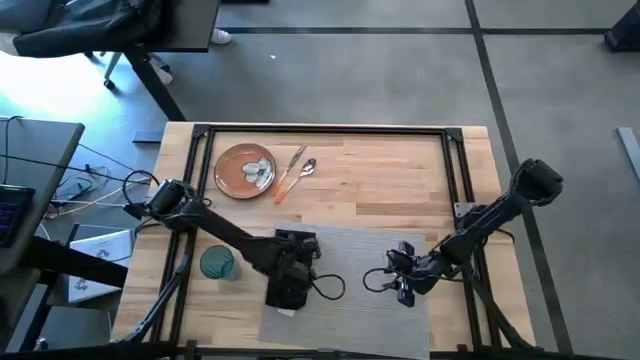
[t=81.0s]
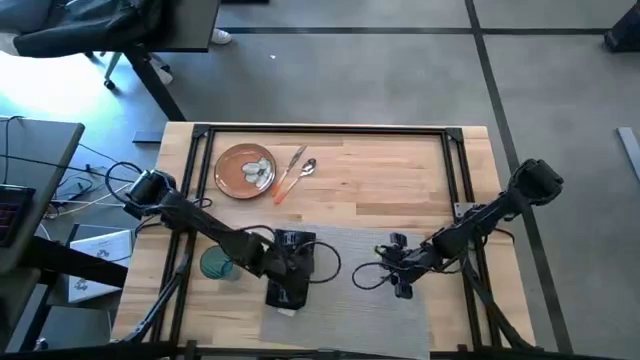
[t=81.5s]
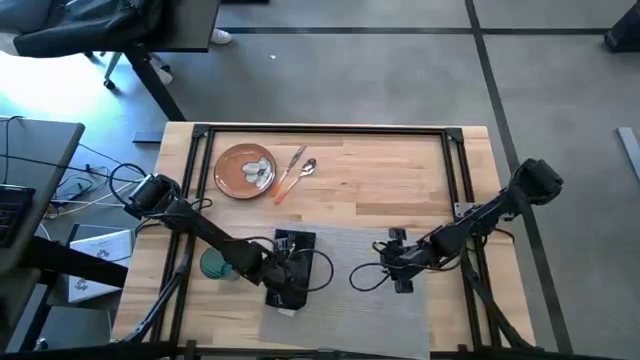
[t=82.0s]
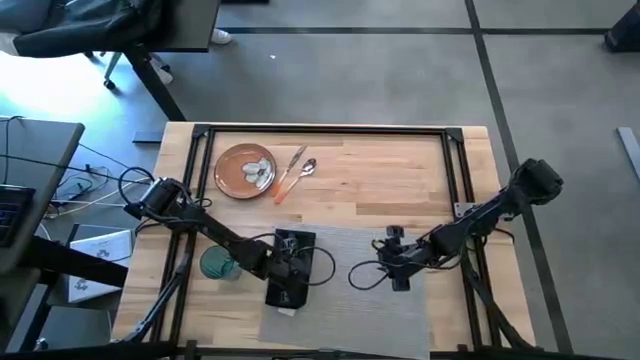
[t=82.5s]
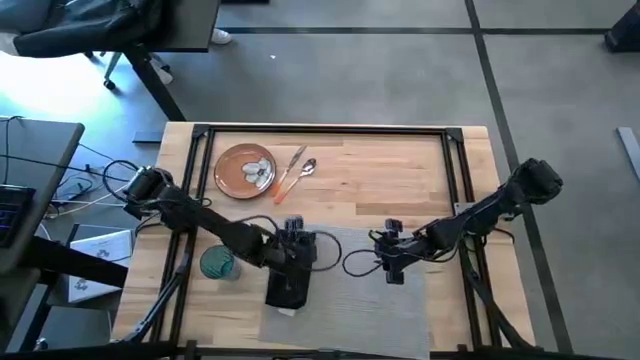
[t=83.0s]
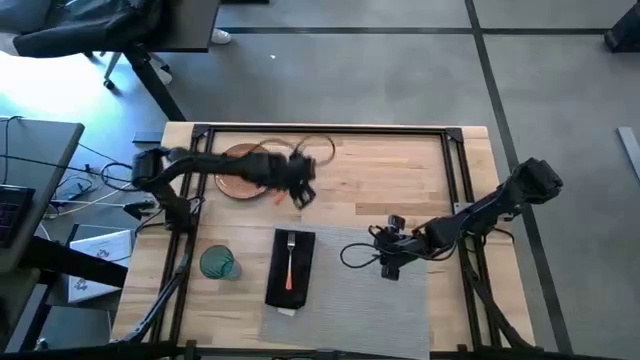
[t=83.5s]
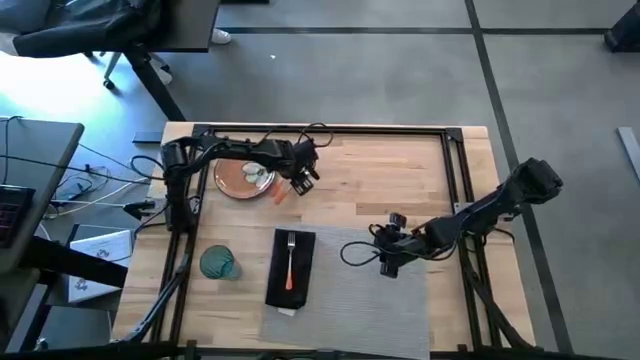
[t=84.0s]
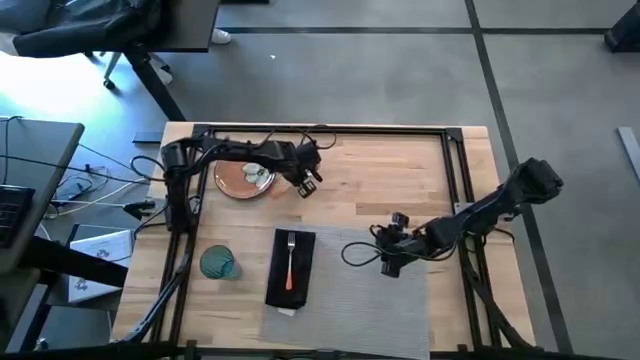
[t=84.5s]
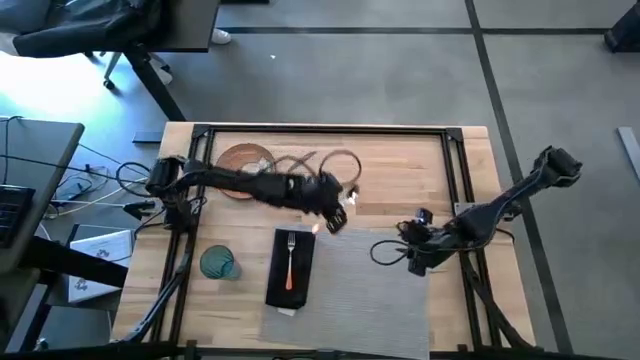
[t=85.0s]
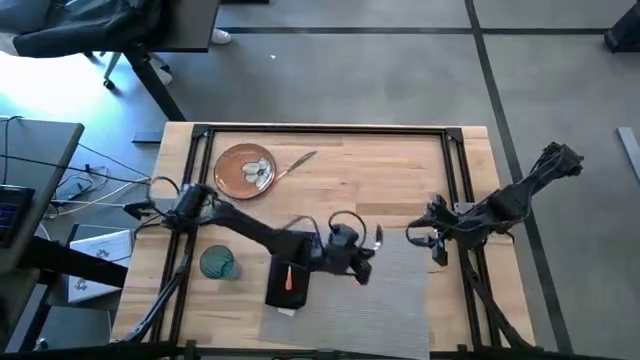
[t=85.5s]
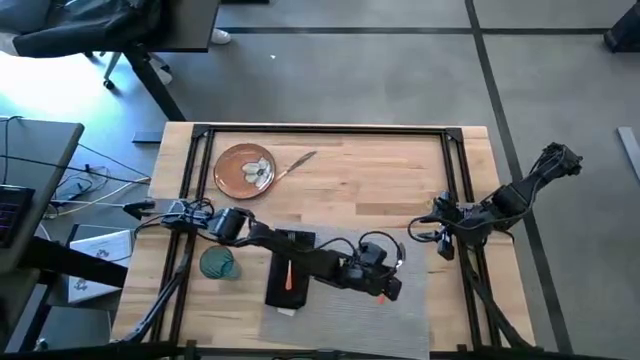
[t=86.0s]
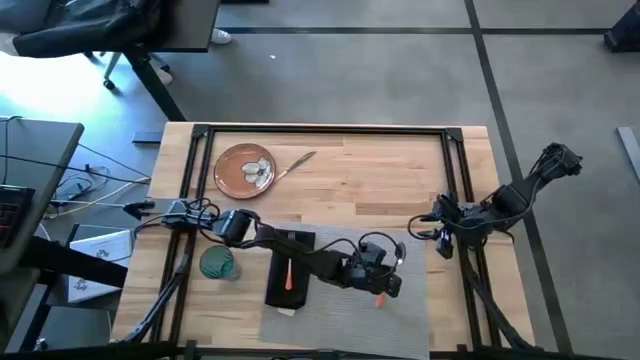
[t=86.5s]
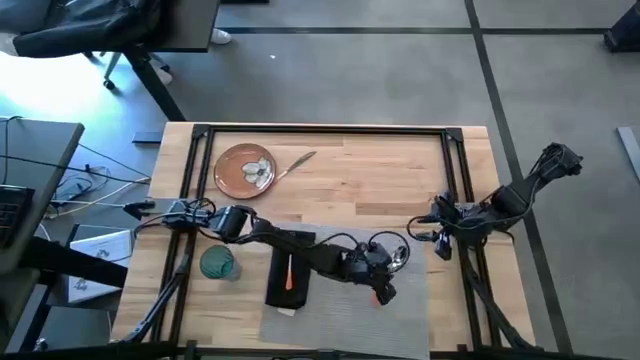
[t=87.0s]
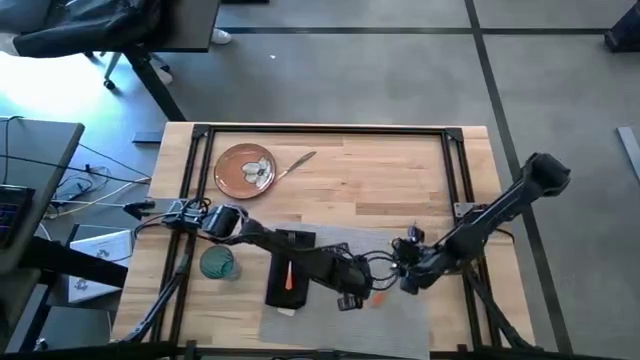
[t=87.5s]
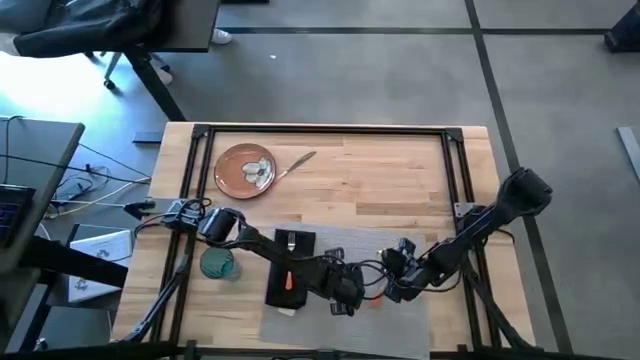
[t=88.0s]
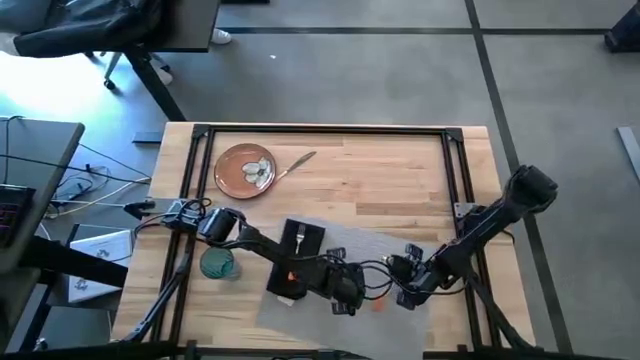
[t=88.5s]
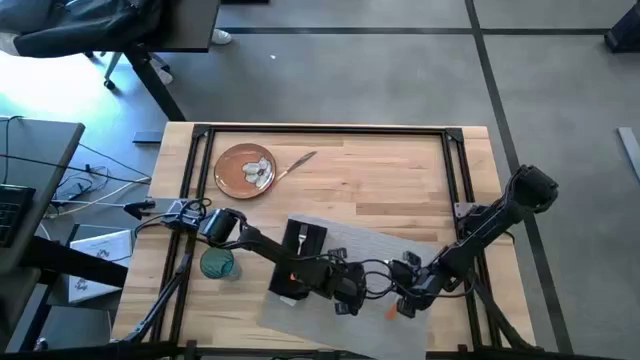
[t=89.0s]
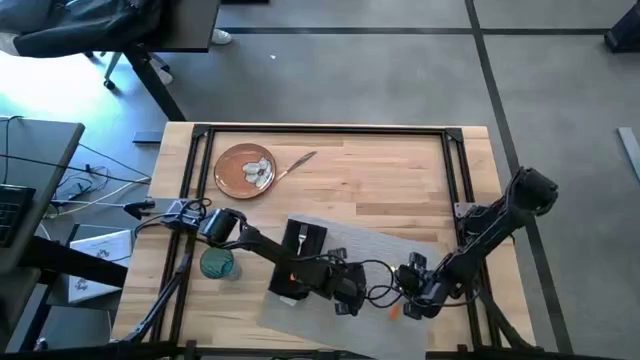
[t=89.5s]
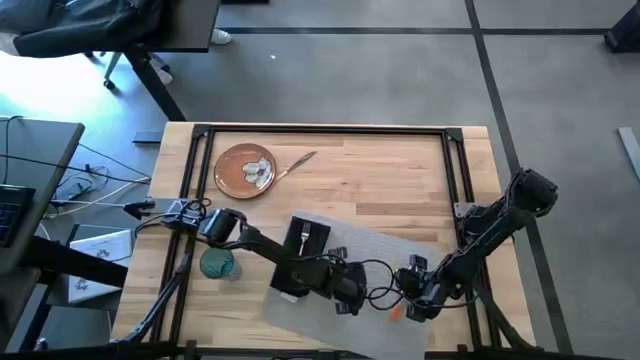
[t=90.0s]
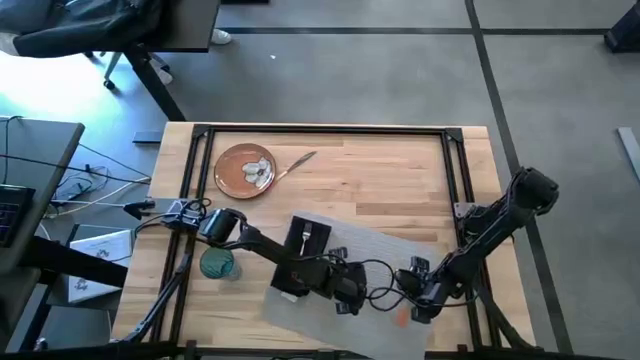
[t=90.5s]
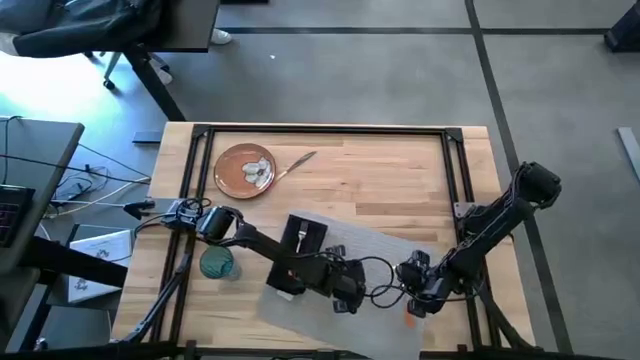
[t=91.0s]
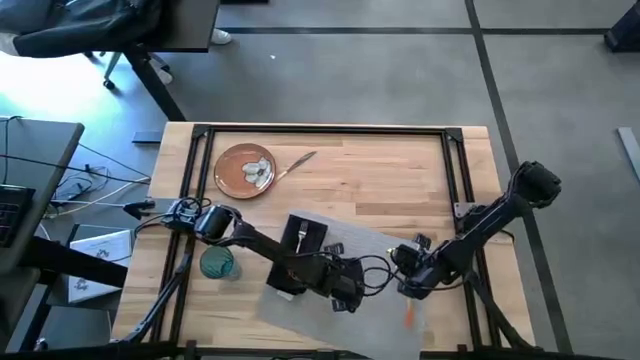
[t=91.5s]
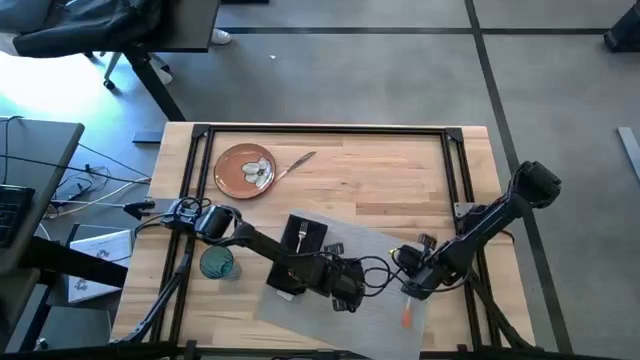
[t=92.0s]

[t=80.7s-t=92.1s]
Task: Set table place
Put the orange spoon on the gray mat

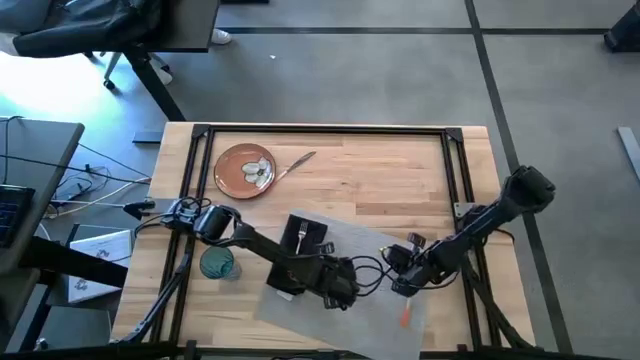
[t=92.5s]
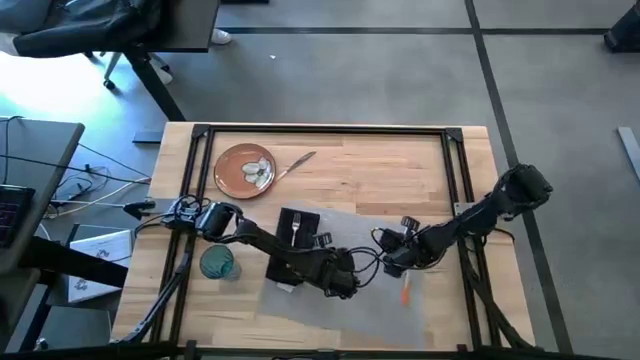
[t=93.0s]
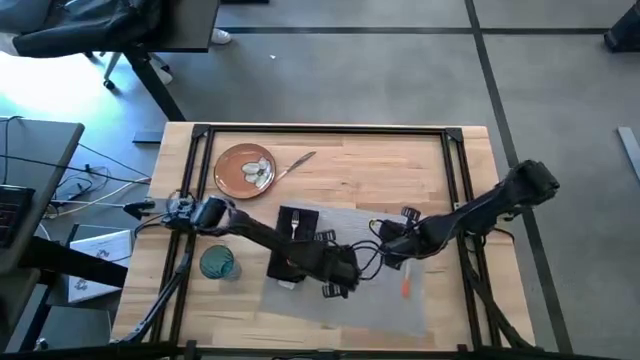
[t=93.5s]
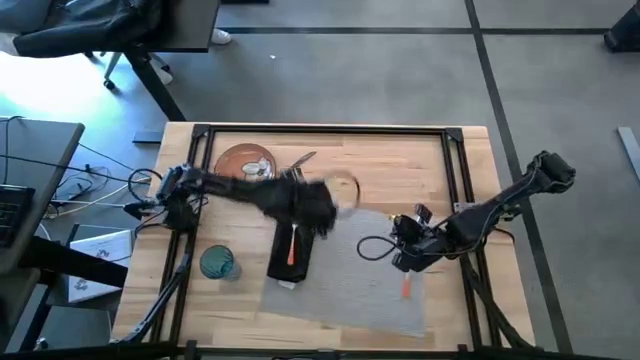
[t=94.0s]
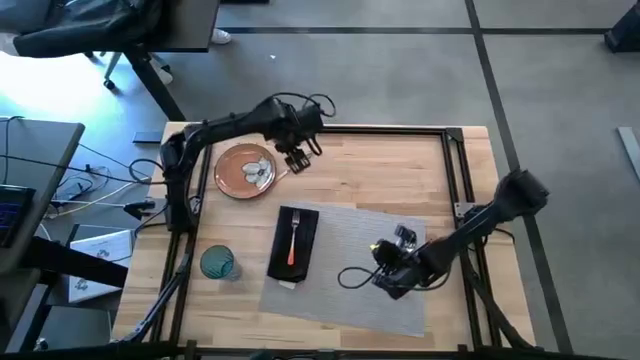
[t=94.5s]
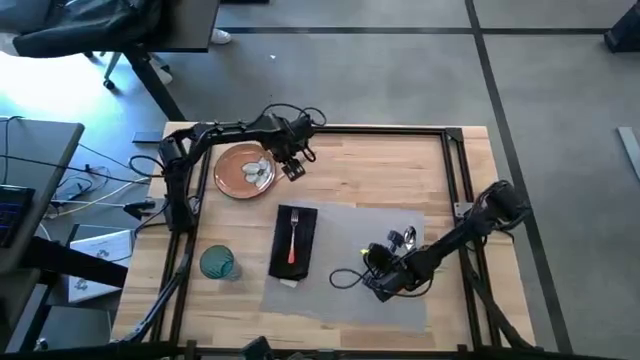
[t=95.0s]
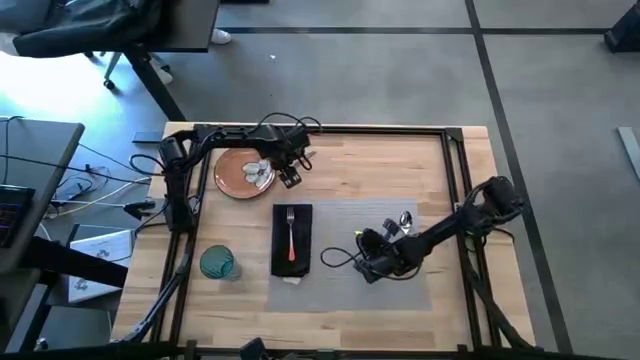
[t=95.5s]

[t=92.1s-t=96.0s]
Adjust the gray mat

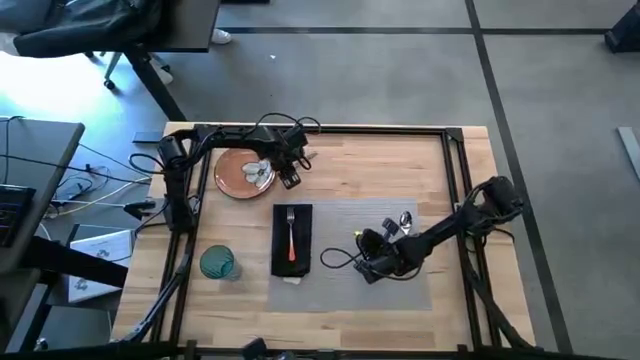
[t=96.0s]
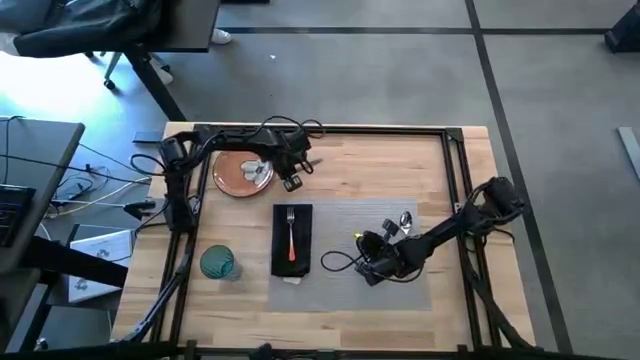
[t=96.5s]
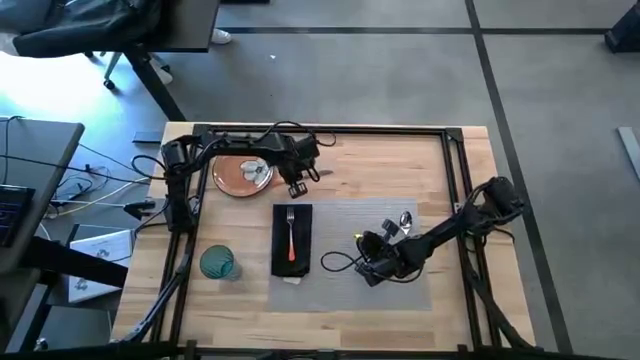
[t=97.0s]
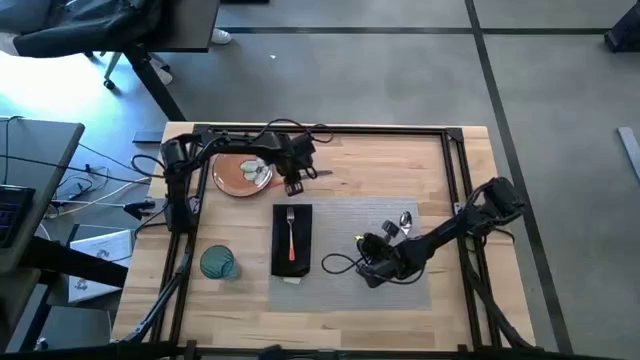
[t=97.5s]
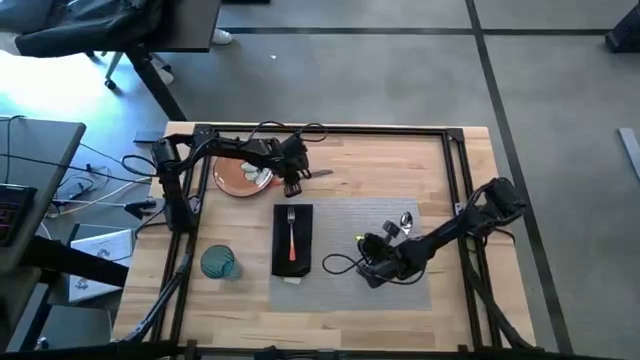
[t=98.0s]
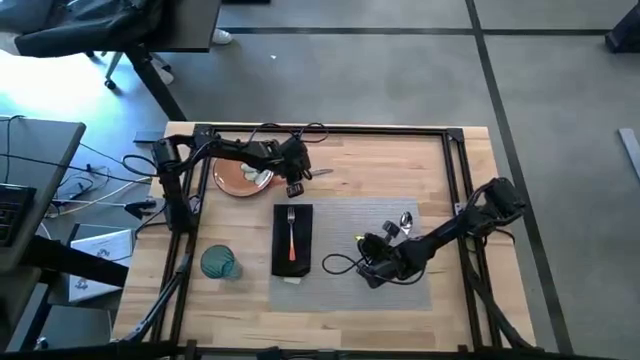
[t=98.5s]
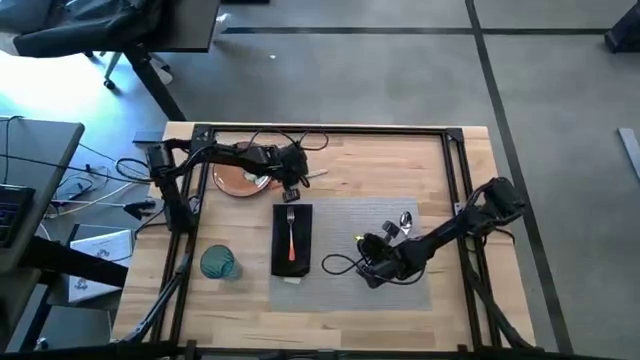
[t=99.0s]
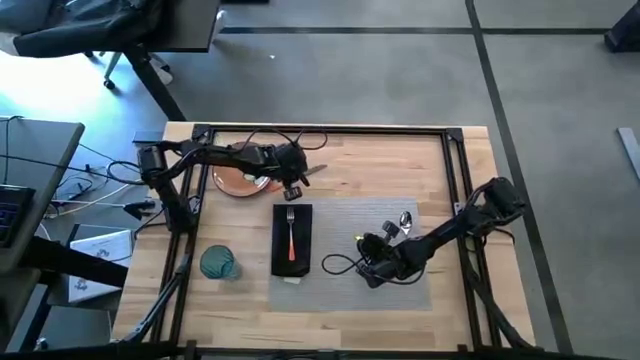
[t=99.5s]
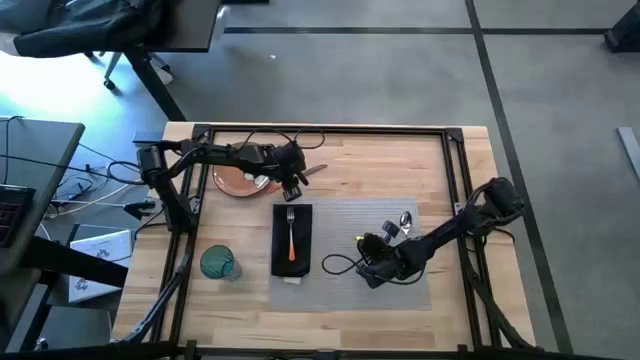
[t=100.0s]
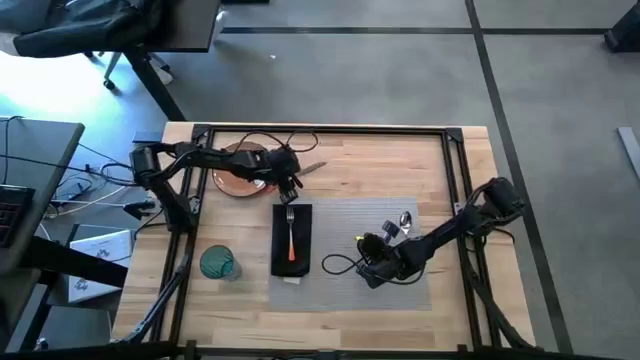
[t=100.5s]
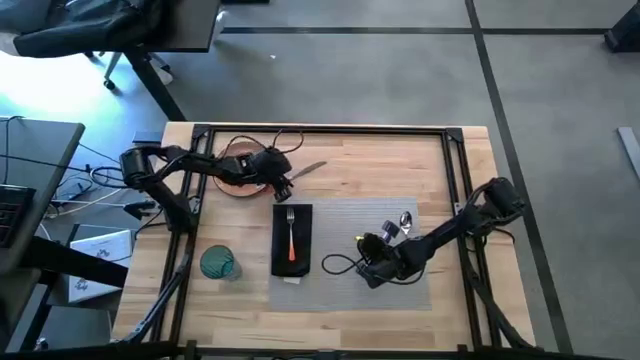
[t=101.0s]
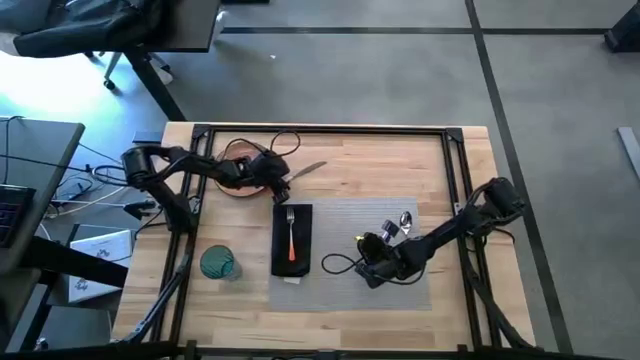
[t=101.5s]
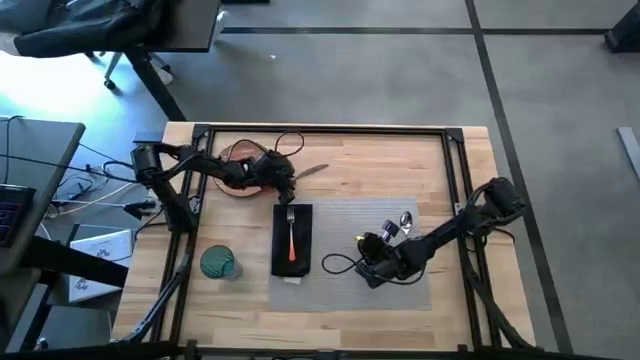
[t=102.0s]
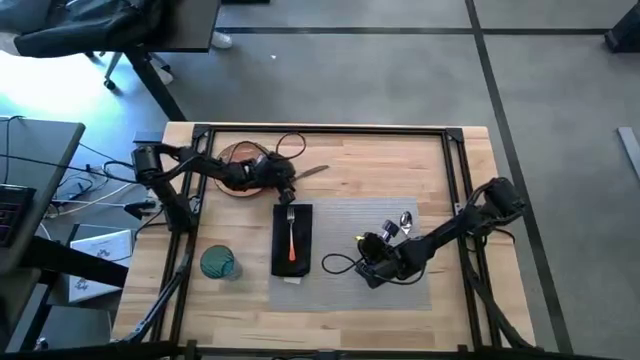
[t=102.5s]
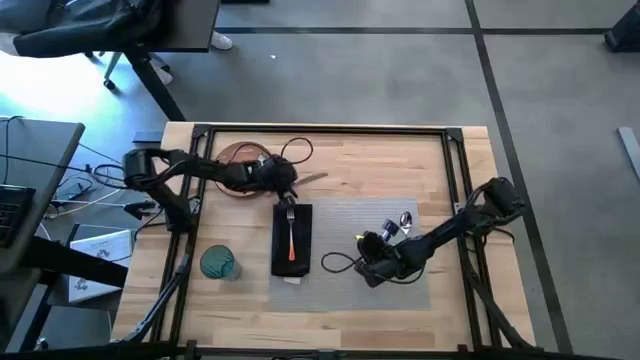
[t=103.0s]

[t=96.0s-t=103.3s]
Put the orange knife on the gray mat to the left of the orange spoon
